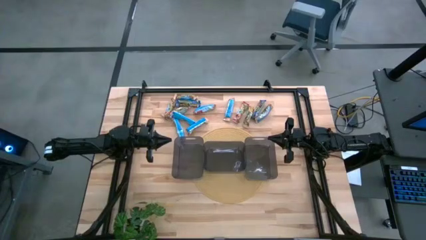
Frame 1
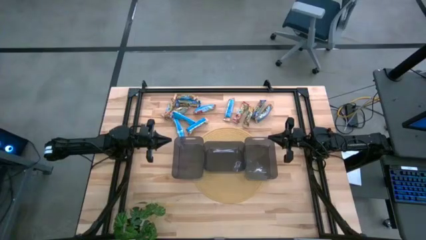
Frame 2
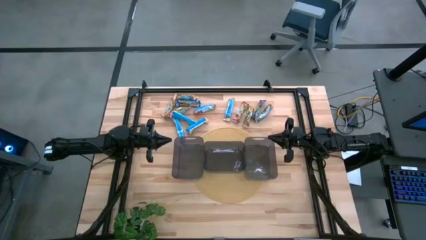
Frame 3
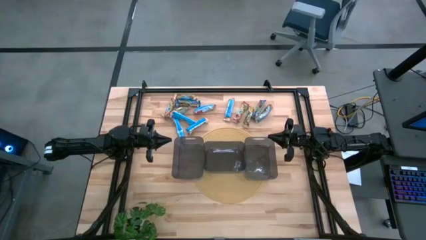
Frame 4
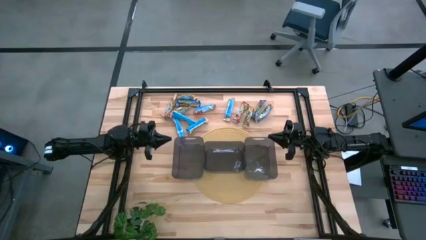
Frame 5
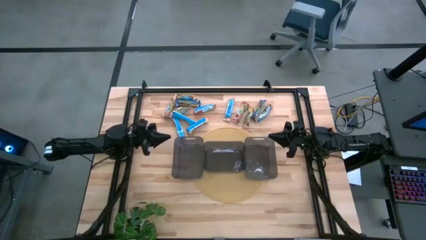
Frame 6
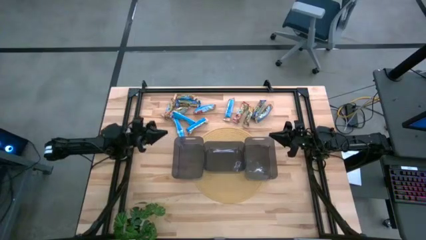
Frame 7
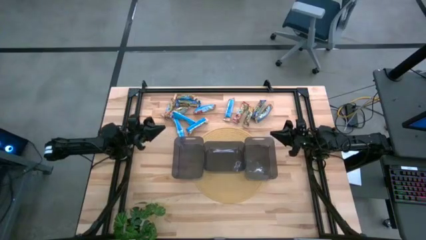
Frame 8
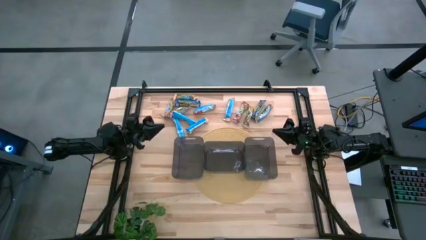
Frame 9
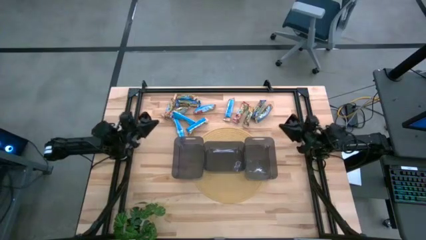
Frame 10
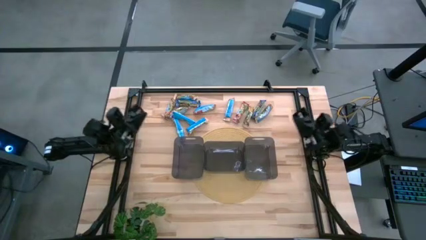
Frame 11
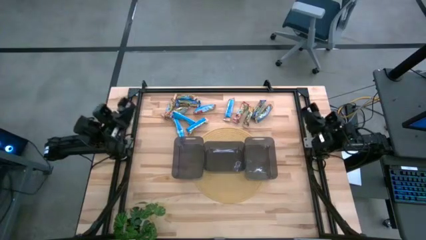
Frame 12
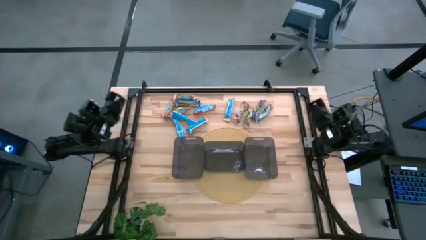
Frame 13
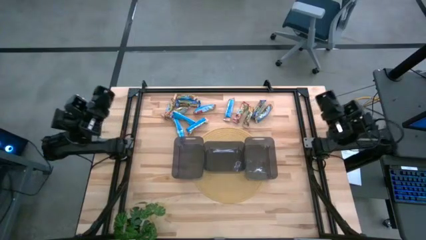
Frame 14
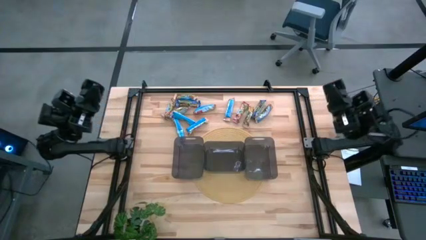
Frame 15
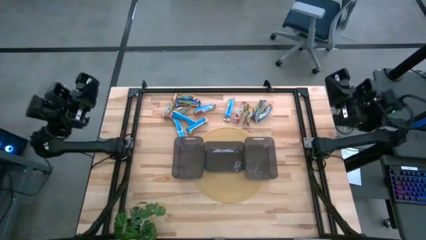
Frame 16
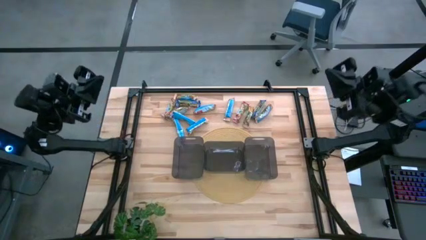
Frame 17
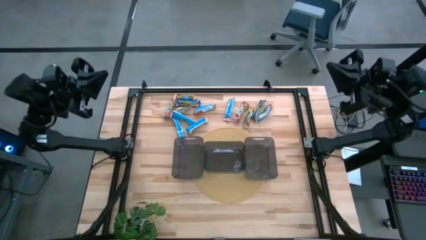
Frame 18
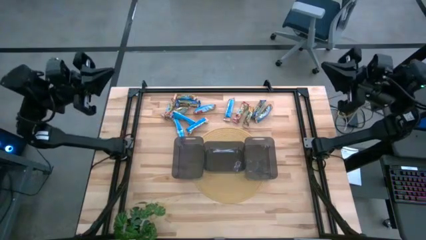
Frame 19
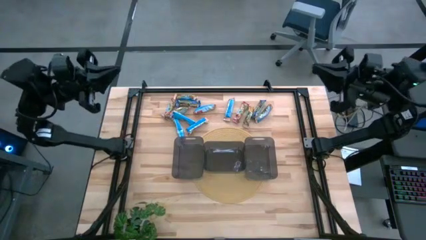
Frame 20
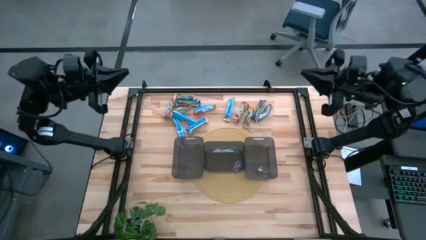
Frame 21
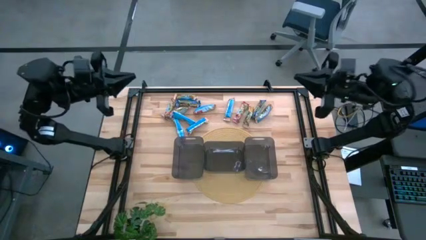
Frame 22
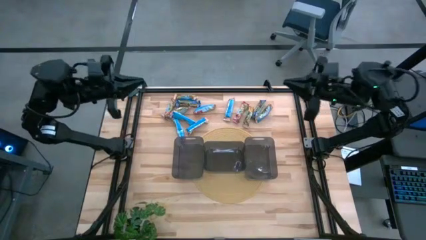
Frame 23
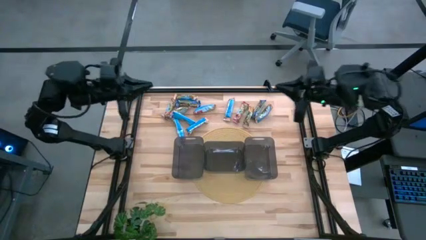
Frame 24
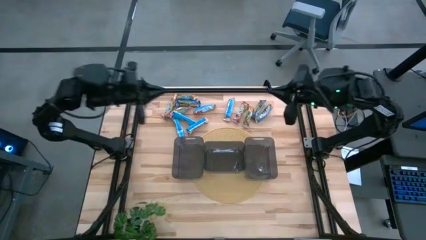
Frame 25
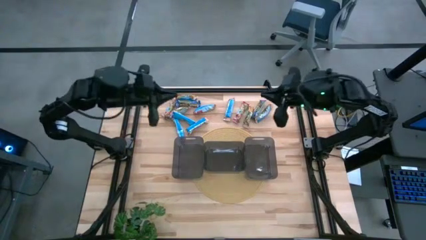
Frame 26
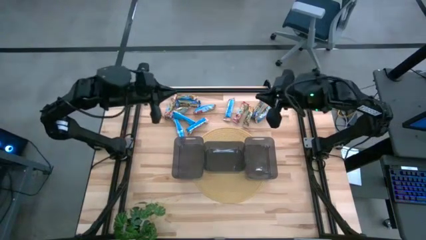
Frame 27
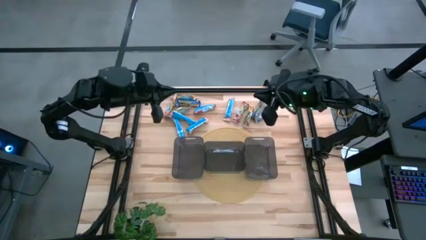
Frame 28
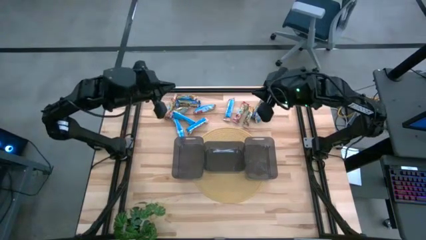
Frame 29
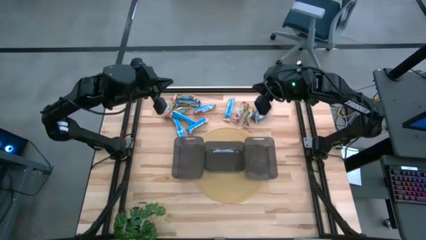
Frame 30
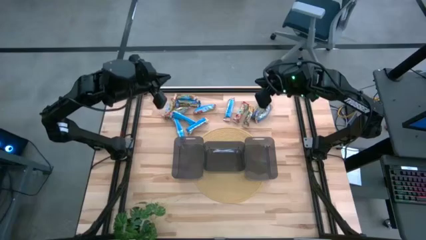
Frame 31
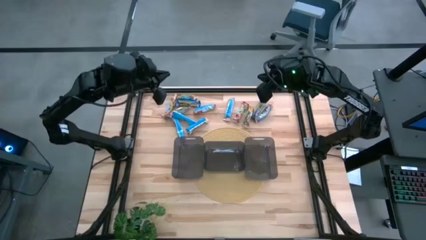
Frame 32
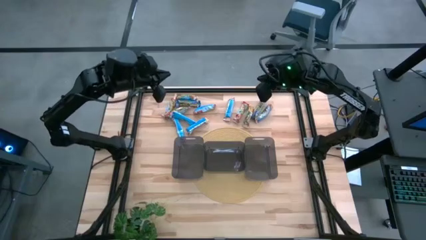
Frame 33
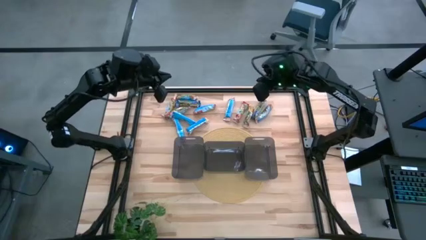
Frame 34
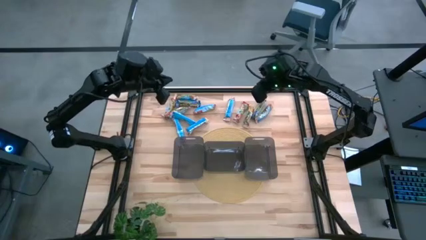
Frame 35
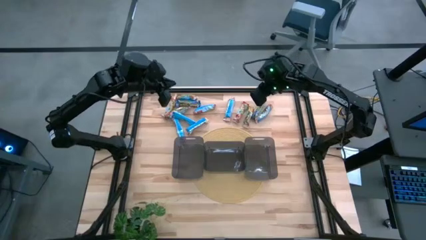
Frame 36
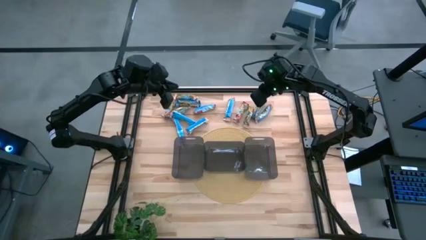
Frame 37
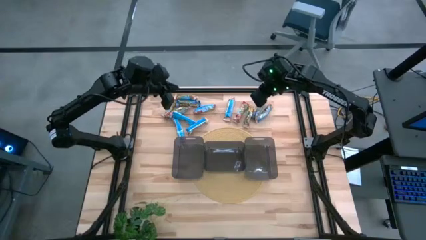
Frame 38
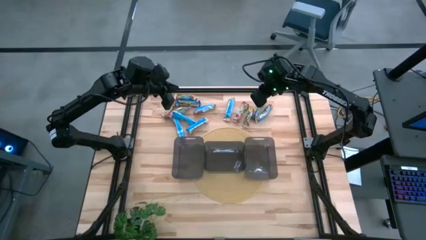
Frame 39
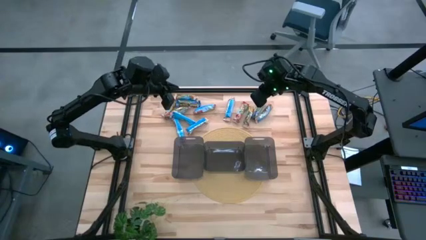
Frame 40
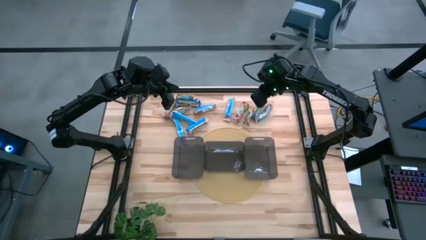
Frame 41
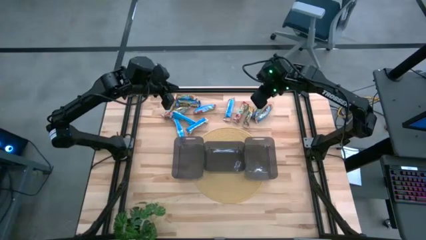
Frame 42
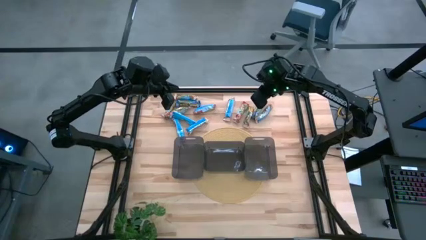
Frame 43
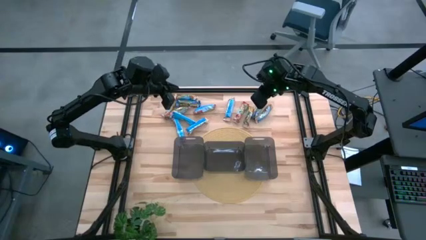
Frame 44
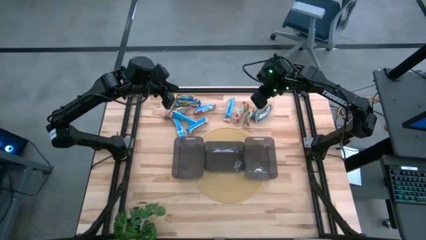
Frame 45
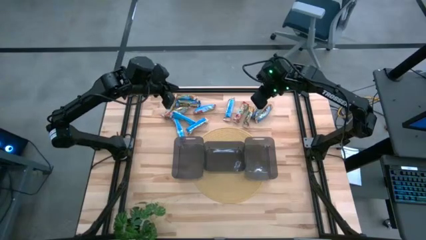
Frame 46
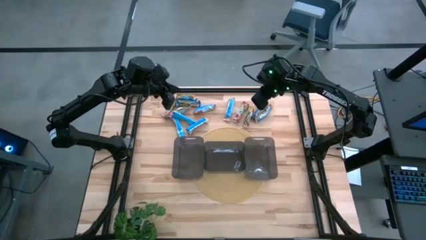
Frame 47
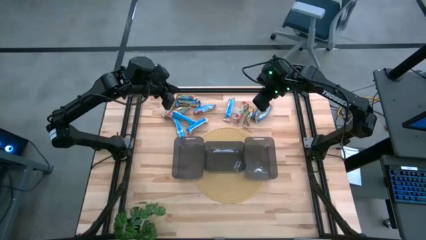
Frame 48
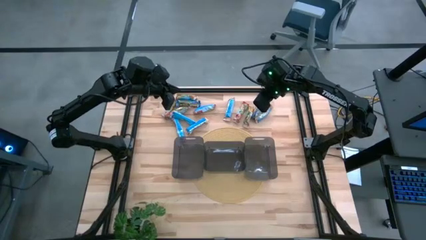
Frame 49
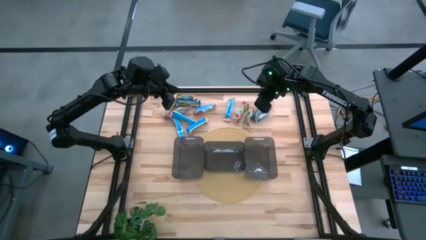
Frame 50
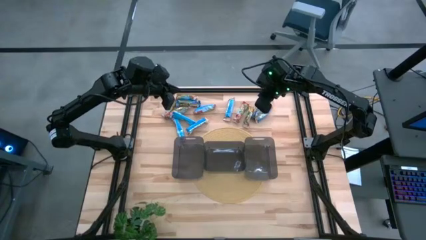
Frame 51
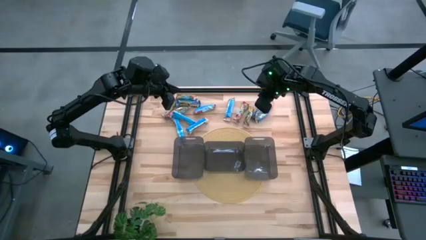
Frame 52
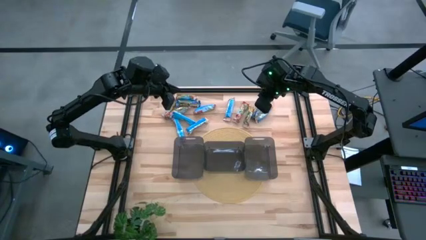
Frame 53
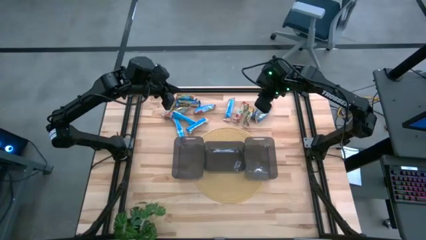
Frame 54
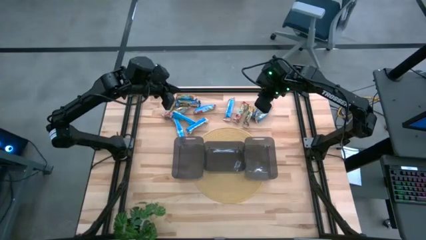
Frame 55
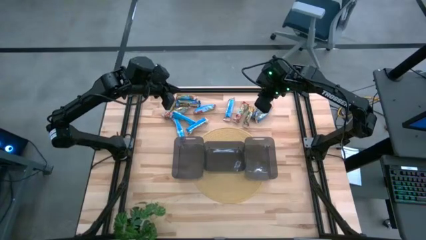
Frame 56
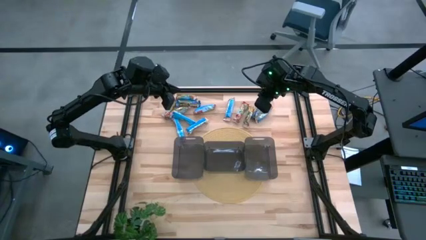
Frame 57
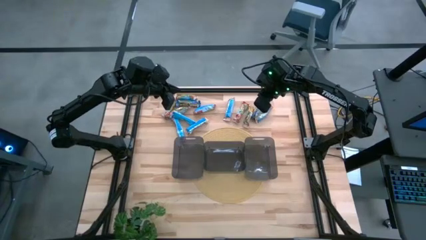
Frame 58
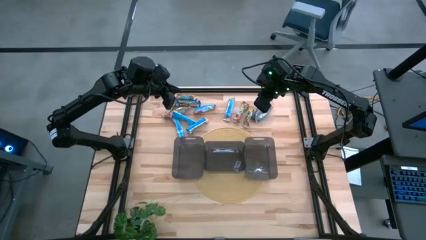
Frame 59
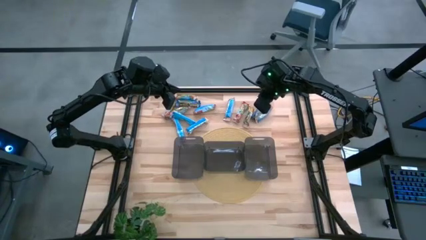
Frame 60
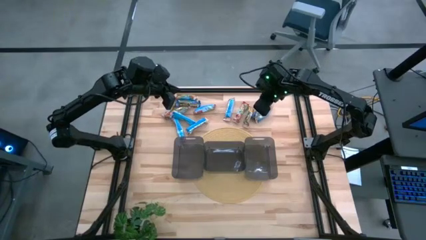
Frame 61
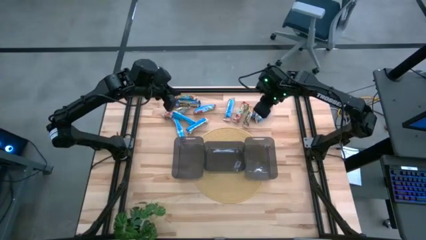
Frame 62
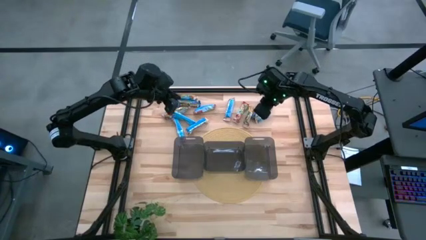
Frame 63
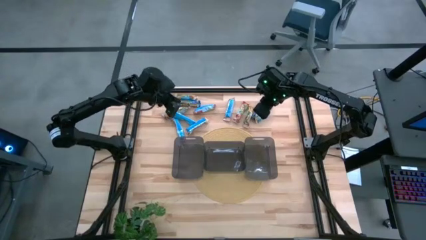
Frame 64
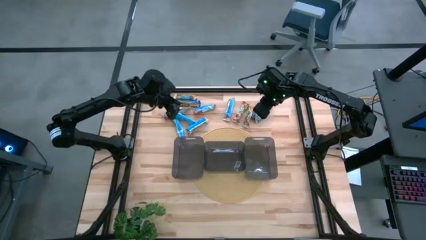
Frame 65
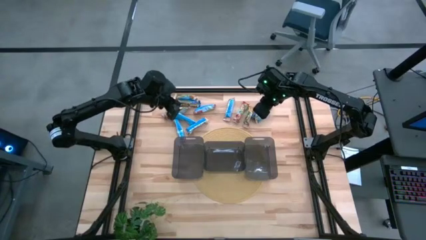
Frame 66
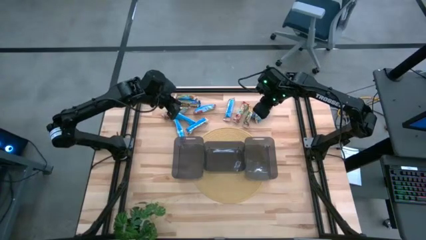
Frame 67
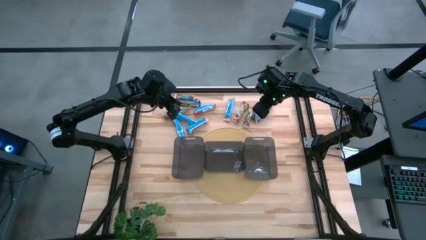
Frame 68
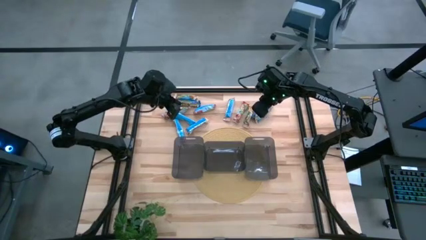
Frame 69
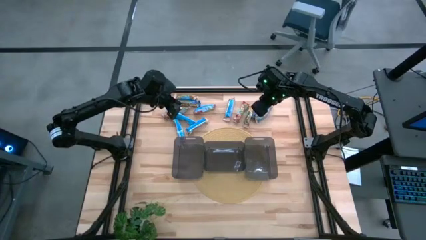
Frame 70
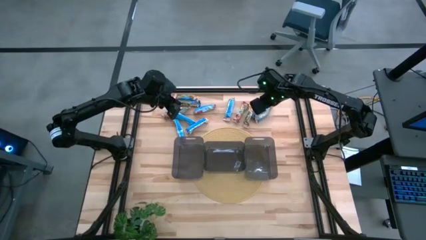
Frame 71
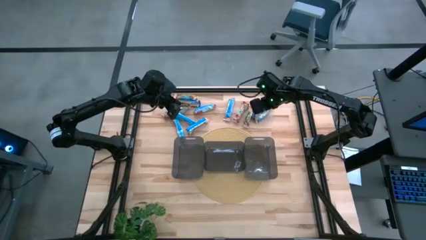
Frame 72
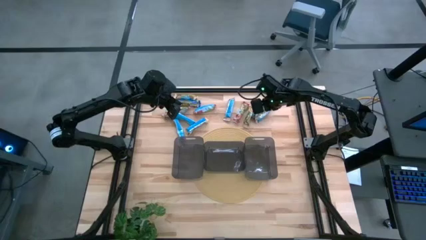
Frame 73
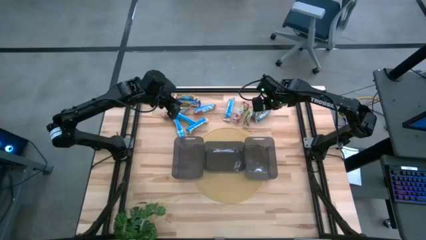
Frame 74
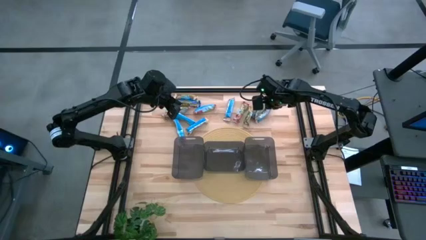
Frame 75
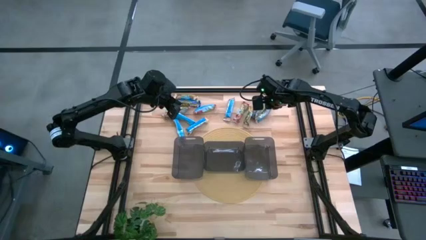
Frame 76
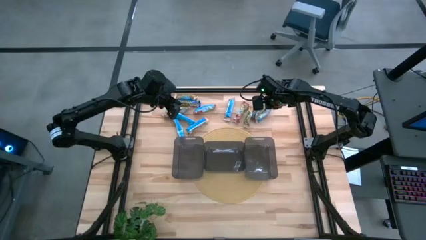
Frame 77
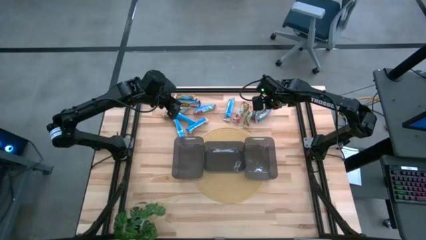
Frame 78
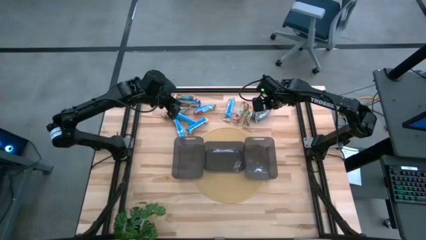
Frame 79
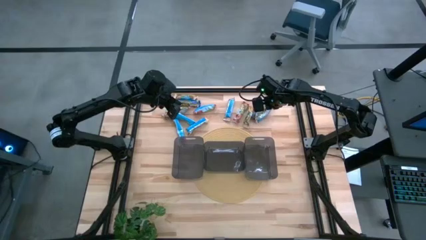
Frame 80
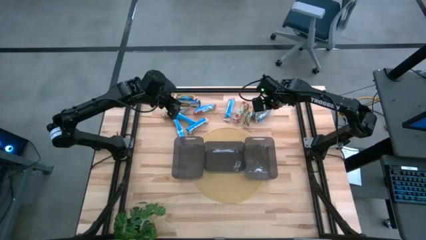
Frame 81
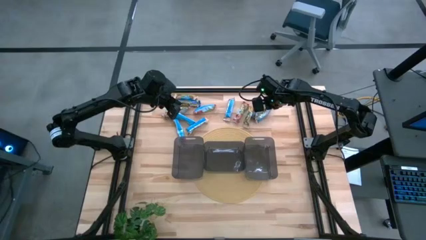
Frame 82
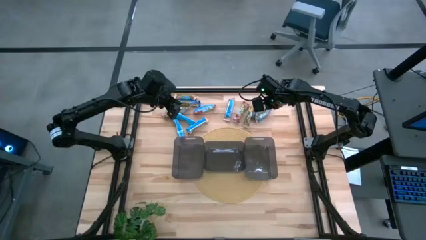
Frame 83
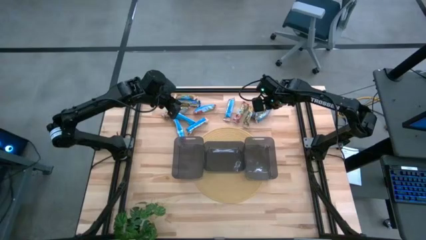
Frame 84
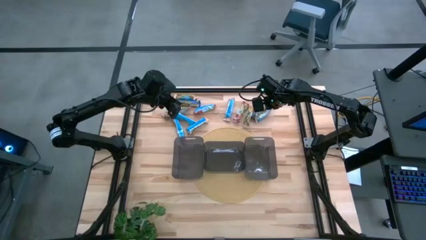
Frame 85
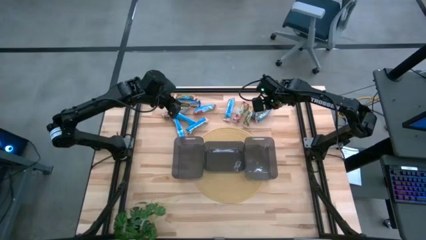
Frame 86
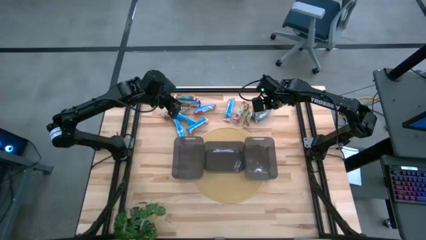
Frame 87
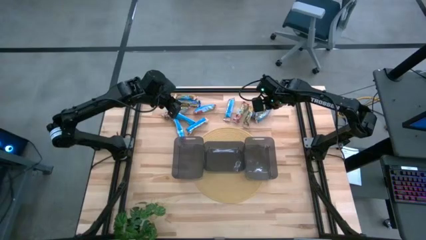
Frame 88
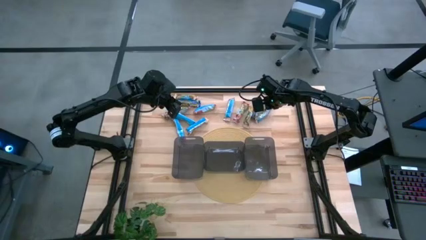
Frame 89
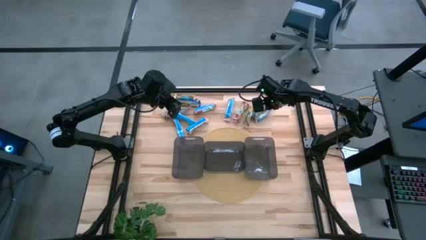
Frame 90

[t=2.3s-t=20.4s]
Task: Pick and place Granola Bars by type
Put the red granola bar into the left black bin
